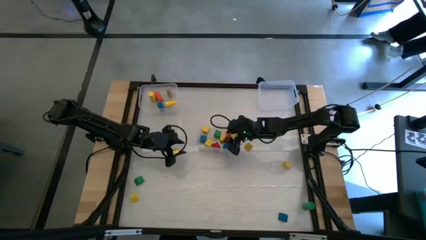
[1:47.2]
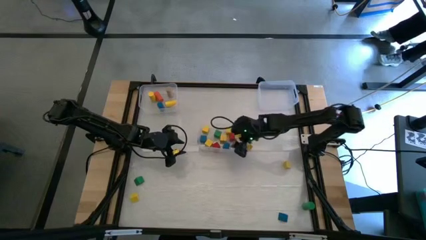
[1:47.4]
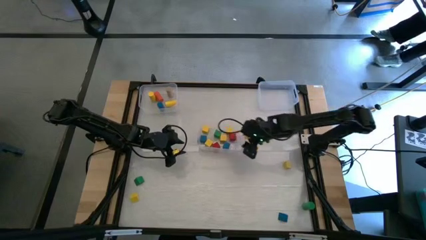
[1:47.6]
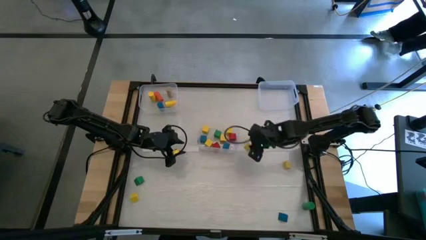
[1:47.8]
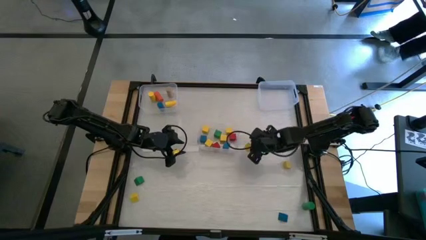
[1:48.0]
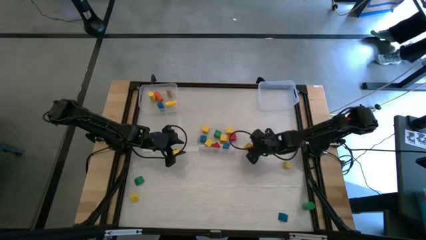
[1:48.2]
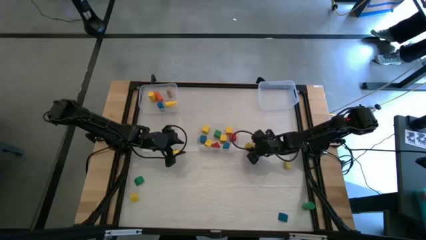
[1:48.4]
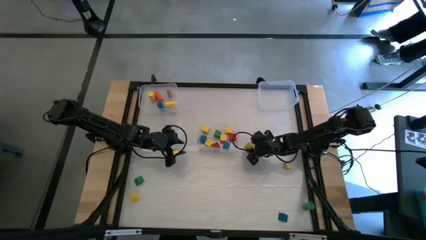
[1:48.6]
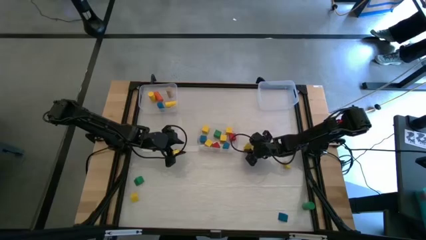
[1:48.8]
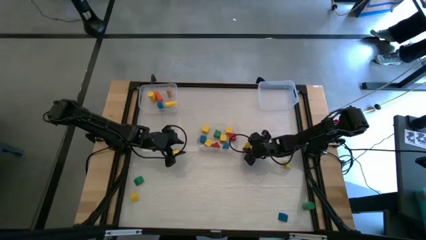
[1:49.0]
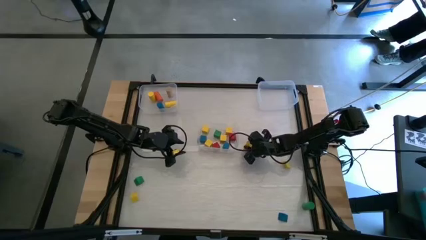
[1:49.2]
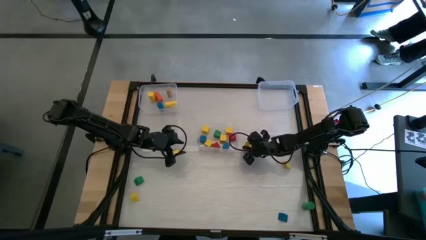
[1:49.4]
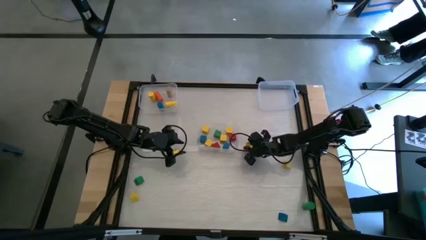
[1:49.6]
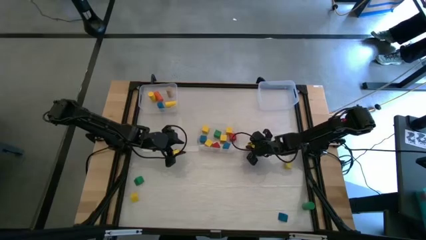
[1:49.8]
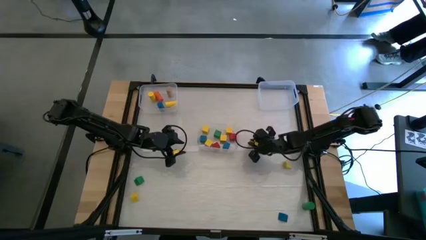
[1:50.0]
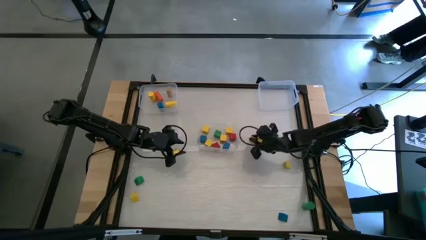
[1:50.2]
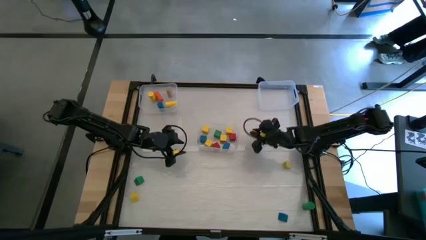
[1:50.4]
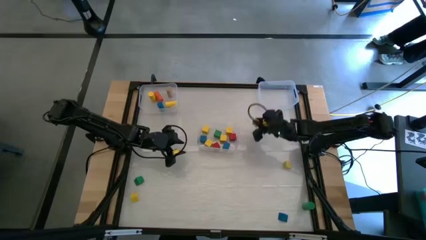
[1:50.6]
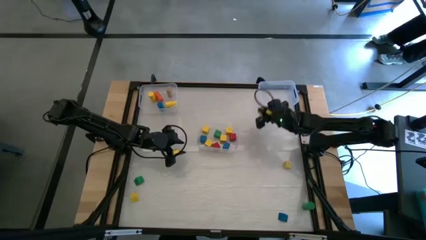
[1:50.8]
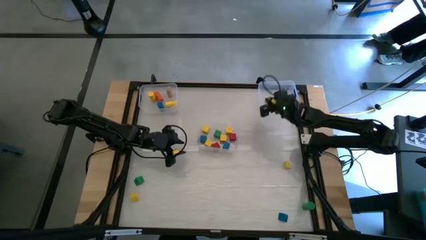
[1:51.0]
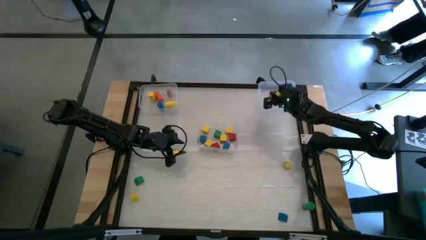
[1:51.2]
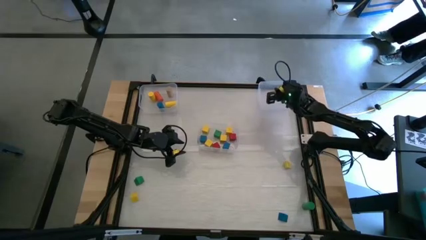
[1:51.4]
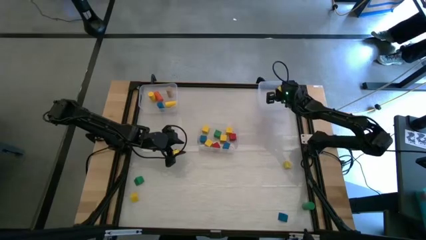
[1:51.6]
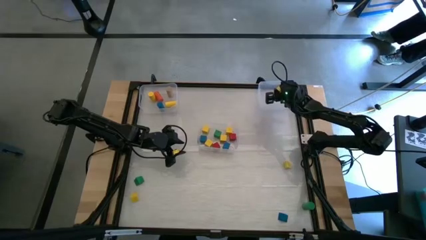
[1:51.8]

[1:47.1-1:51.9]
Task: Sort blocks by size
Put the yellow triangular block into the top right transparent bin

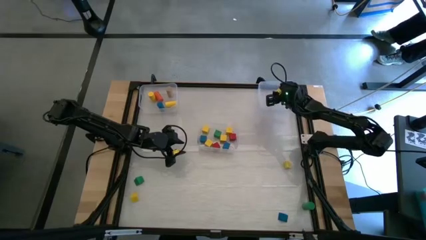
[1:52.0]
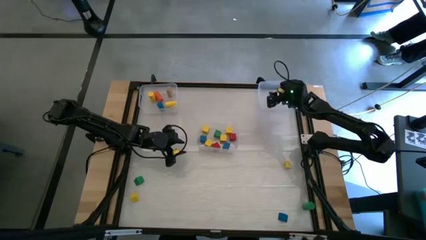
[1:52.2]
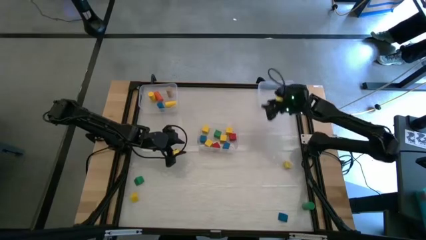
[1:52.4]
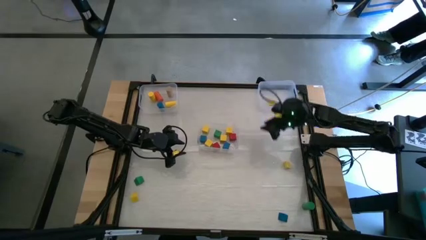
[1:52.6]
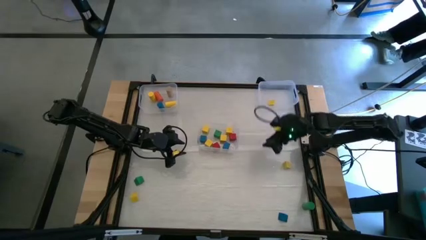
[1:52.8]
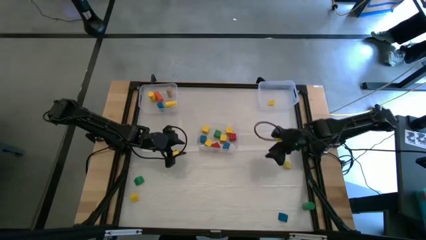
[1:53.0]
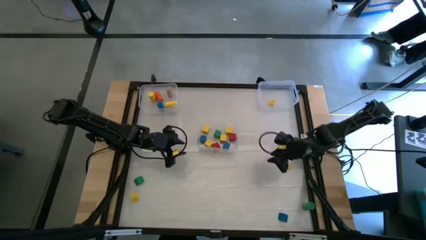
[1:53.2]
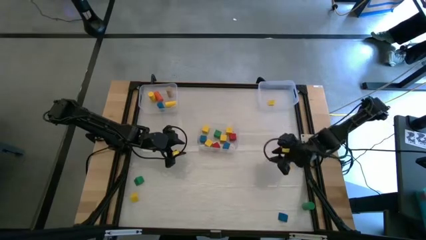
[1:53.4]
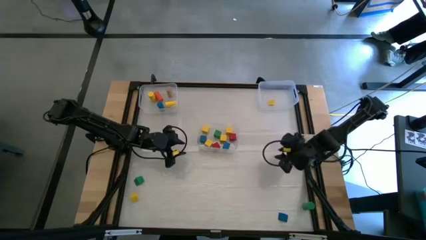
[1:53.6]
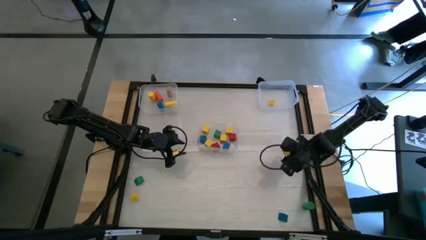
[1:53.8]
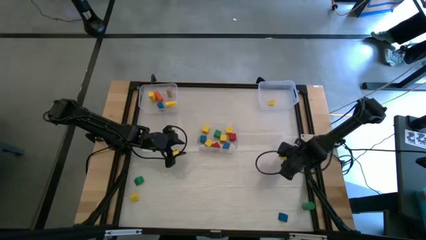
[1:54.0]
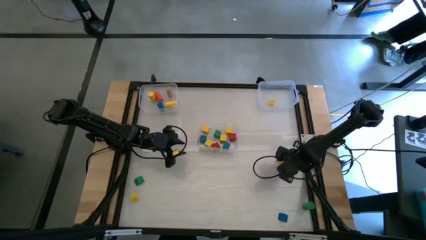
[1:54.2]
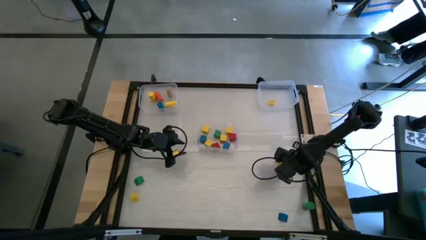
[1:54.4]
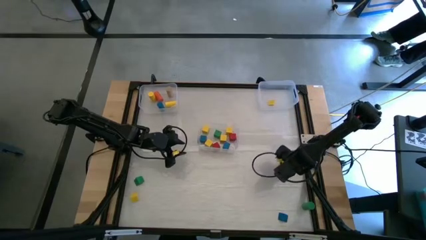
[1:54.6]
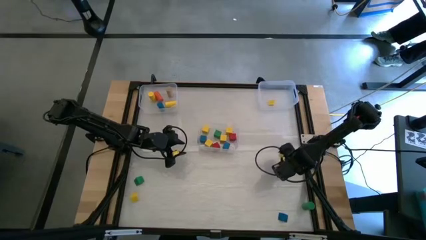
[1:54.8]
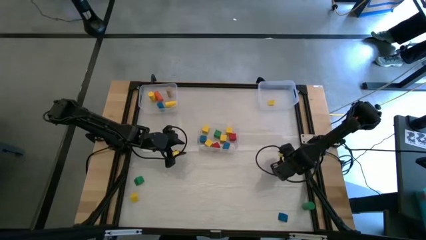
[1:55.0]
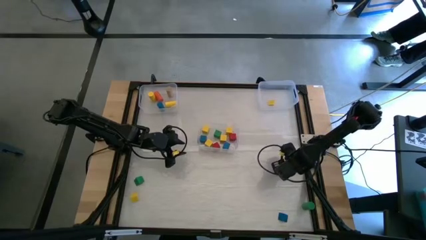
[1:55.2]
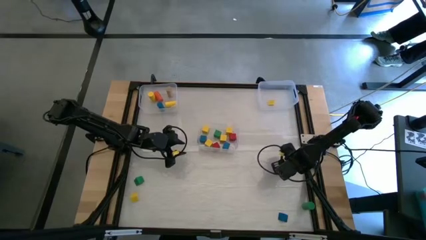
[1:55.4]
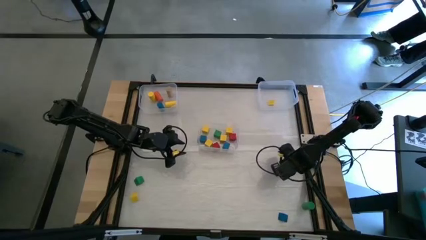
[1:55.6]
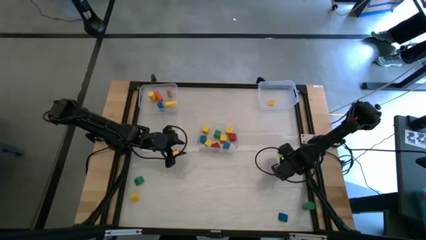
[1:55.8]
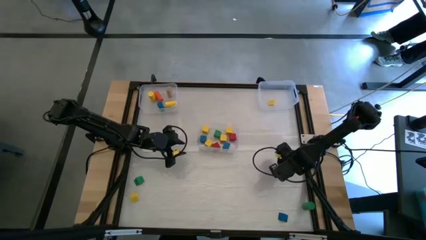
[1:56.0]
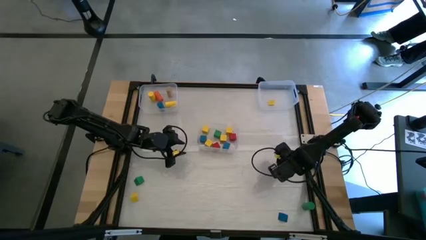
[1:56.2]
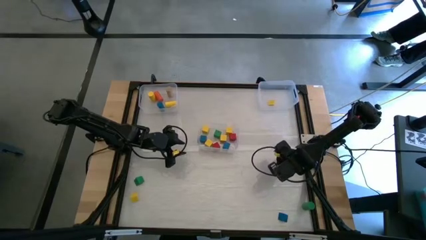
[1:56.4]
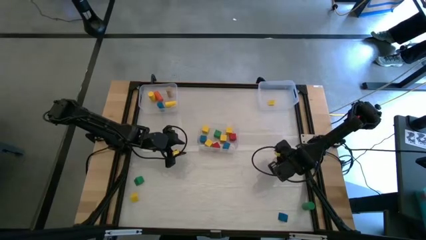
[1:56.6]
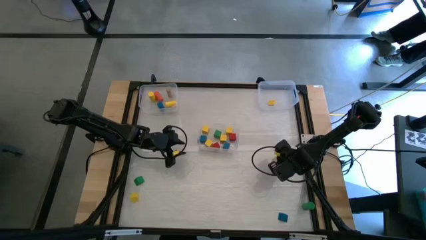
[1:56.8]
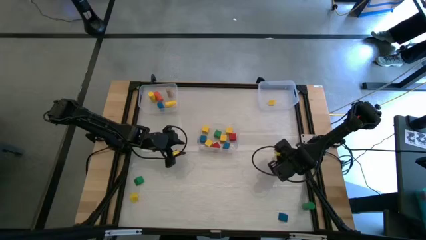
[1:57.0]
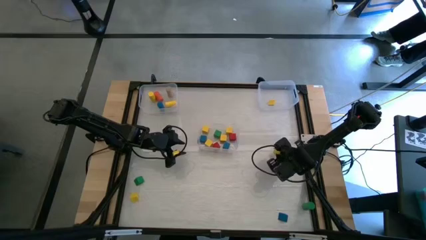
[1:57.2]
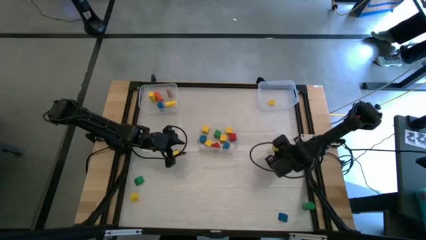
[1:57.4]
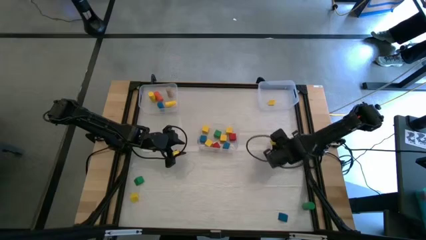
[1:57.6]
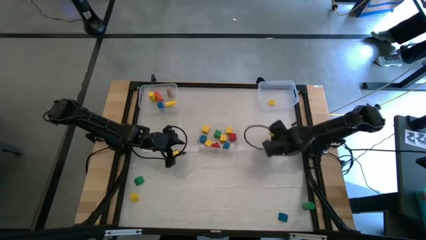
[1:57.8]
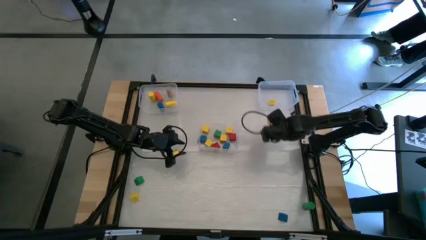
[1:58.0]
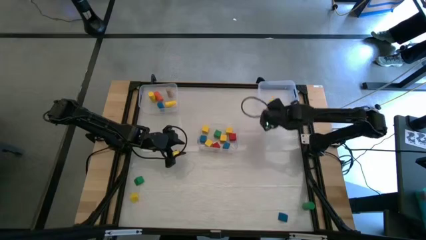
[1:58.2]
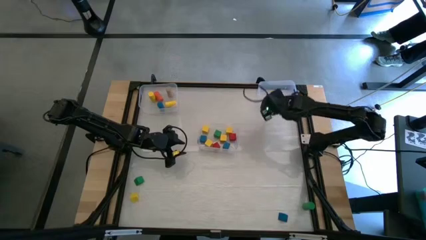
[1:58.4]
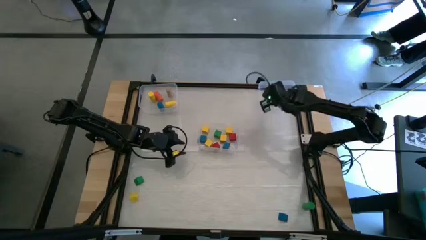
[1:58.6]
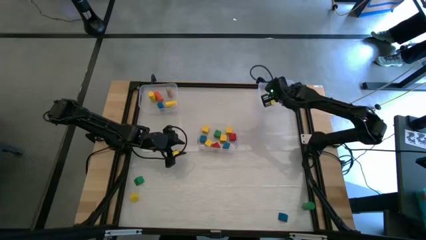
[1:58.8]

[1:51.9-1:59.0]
Put the yellow triangular block into the top right transparent bin

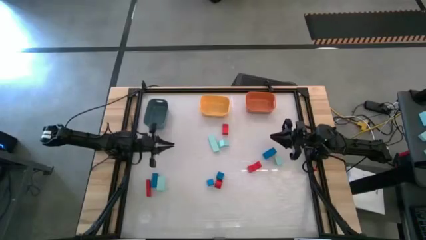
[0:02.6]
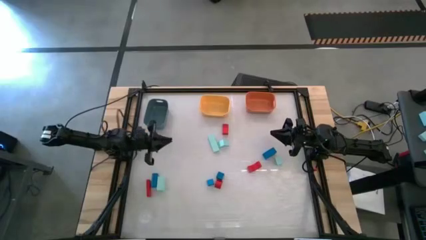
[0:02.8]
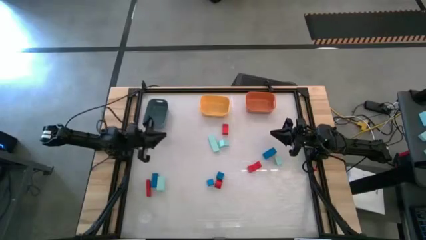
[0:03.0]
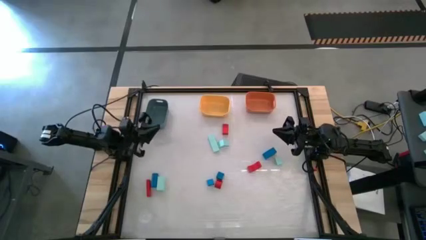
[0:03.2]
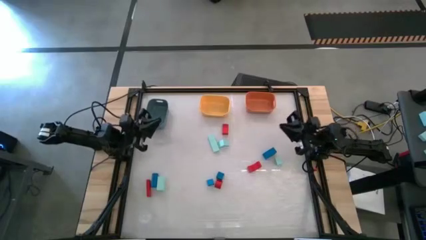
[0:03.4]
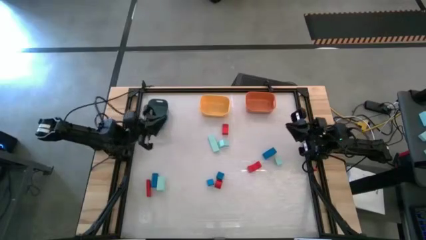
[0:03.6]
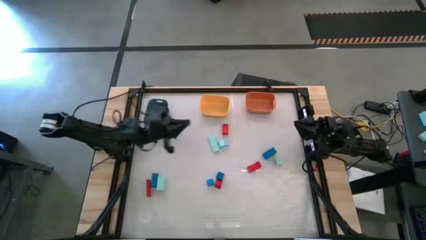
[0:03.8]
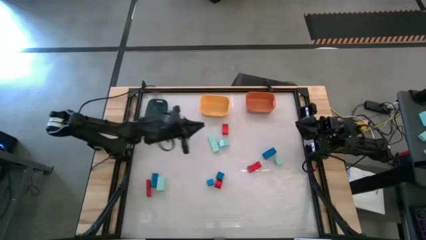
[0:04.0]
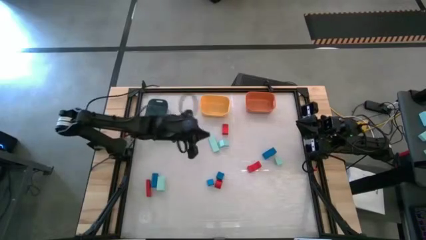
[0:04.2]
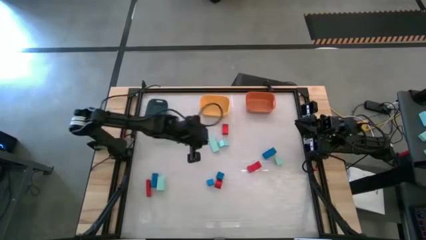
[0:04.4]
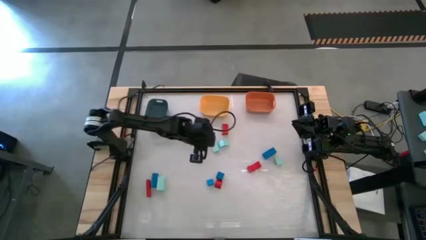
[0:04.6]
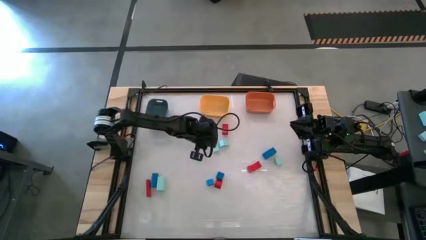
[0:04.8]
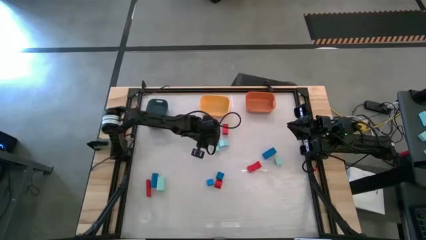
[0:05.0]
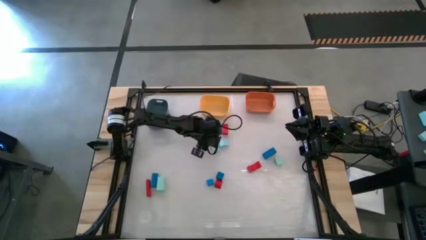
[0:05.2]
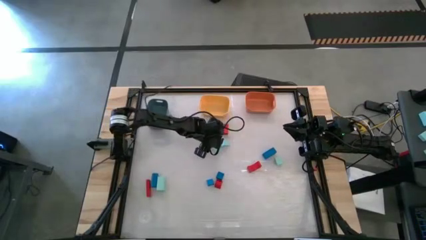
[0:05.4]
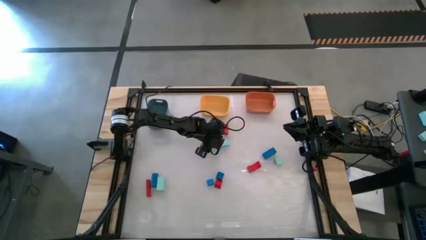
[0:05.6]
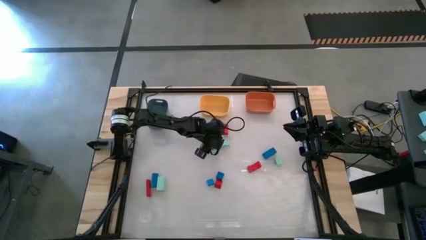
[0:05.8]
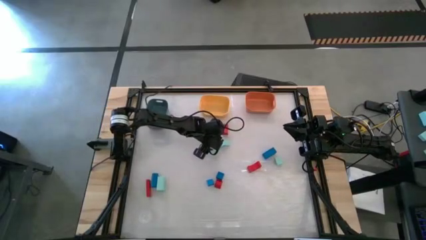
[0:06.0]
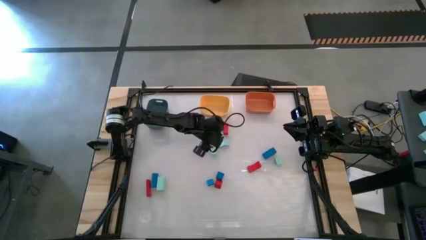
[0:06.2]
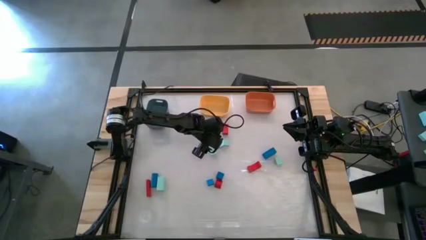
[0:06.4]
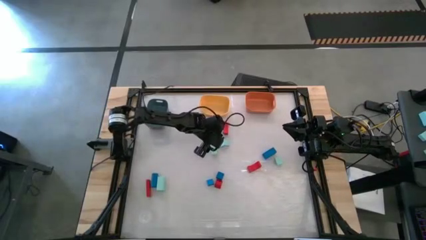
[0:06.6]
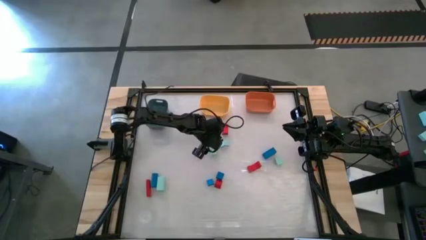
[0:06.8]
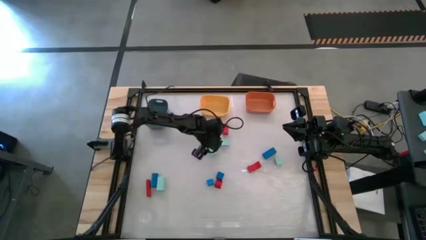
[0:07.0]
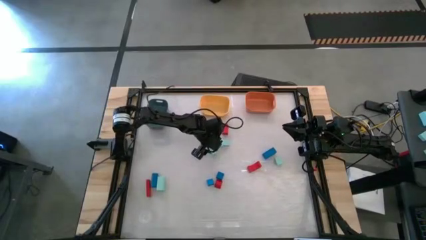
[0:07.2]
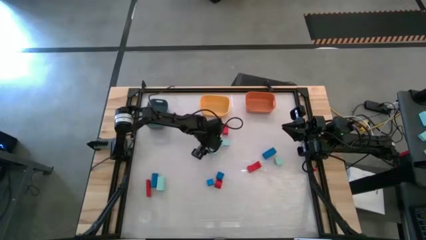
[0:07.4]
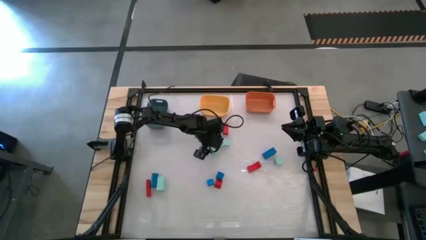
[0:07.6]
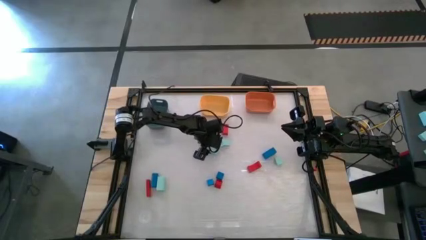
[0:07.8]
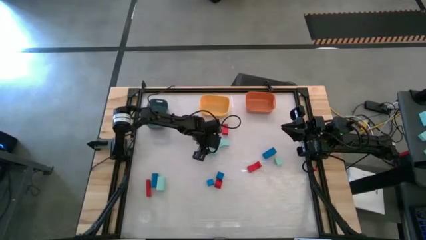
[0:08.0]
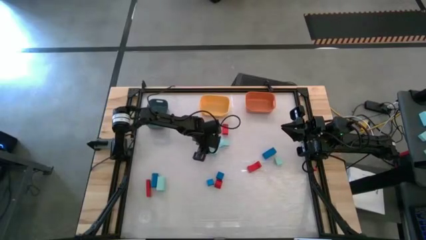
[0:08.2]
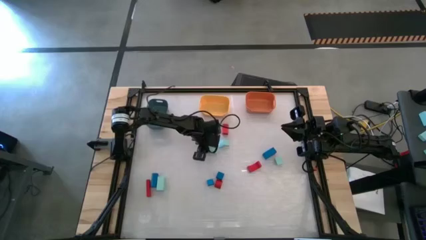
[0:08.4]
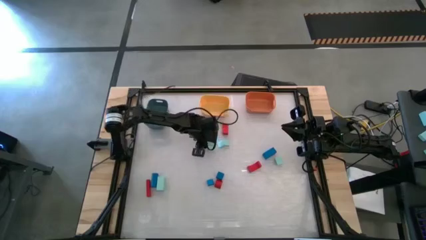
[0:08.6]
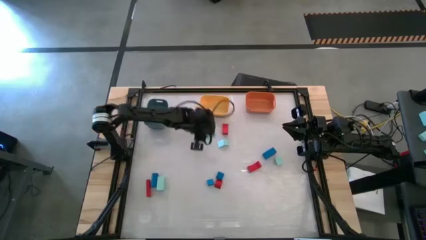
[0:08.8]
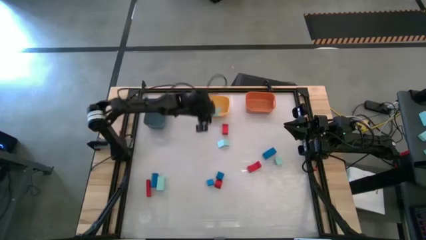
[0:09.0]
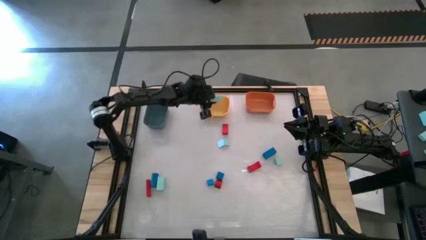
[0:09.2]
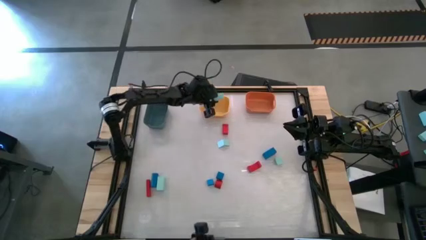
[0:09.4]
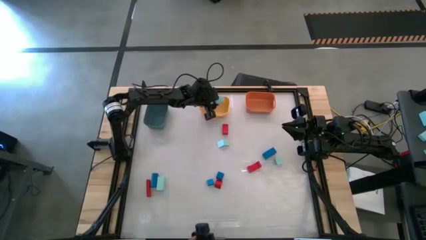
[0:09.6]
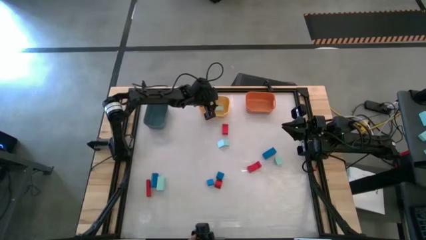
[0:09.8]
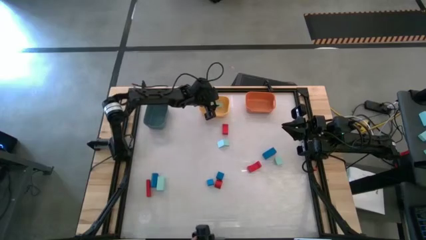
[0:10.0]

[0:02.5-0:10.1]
Task: Sort & place blocks by color
Put the large light blue rectangular block into the yellow bin
